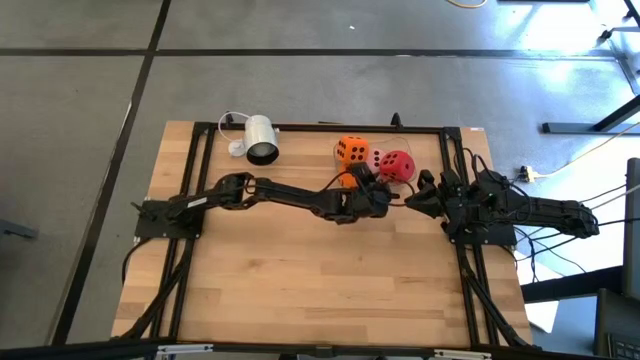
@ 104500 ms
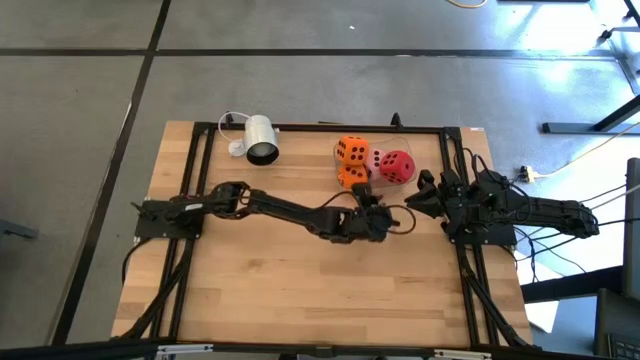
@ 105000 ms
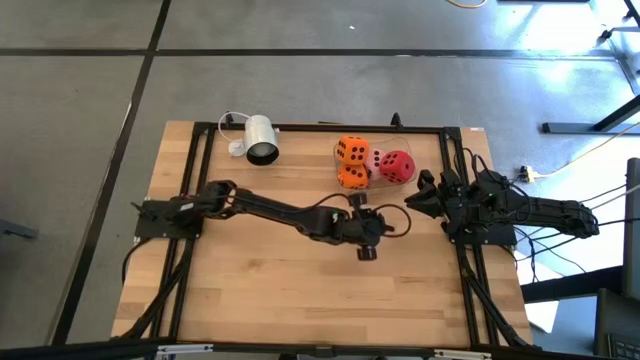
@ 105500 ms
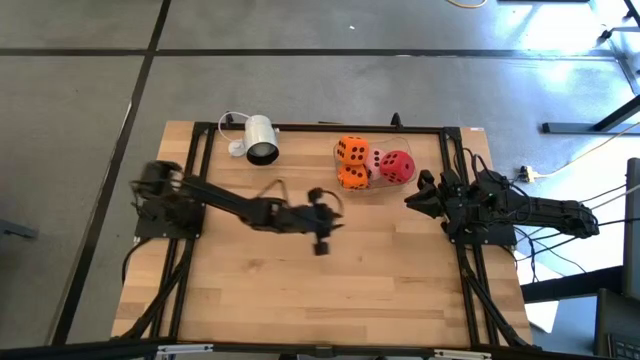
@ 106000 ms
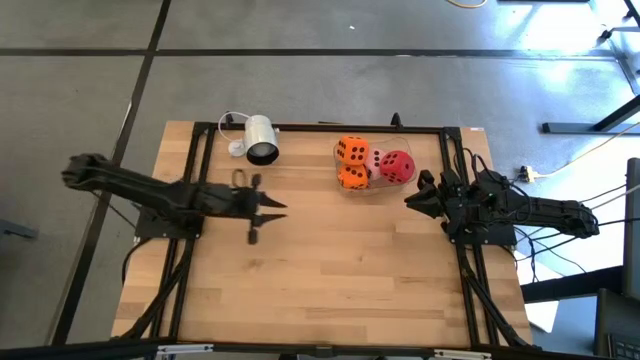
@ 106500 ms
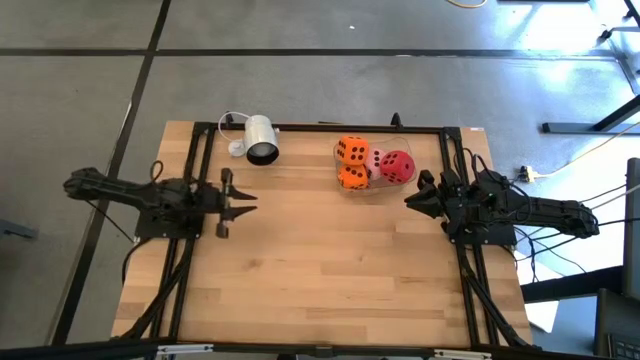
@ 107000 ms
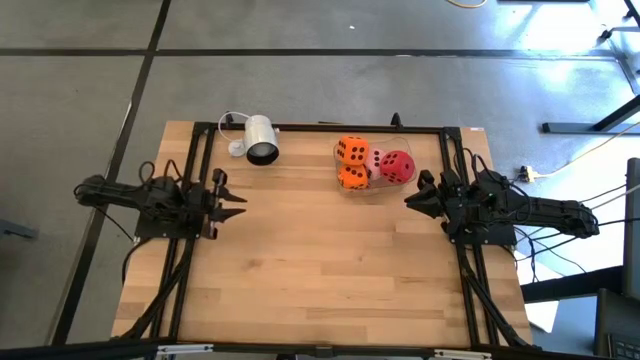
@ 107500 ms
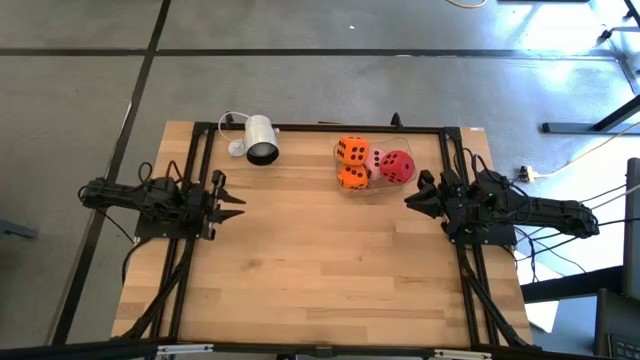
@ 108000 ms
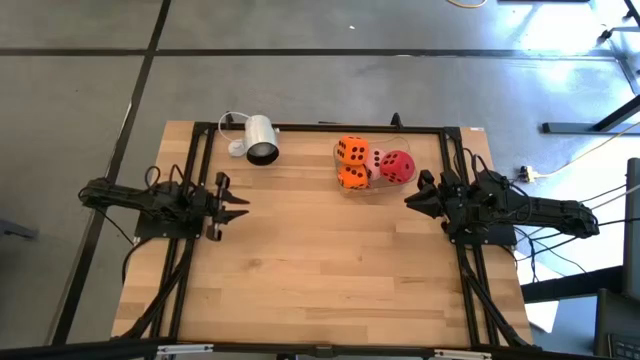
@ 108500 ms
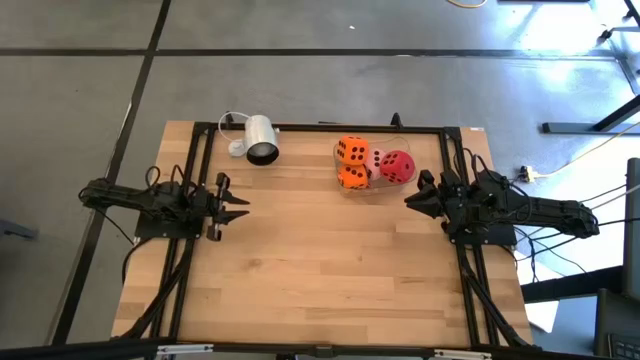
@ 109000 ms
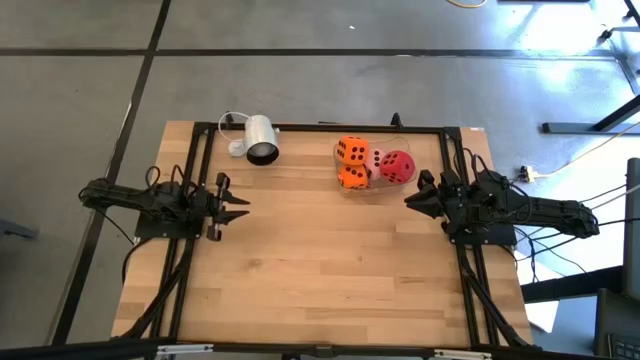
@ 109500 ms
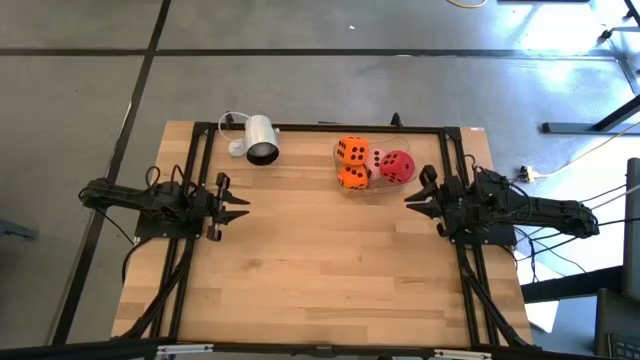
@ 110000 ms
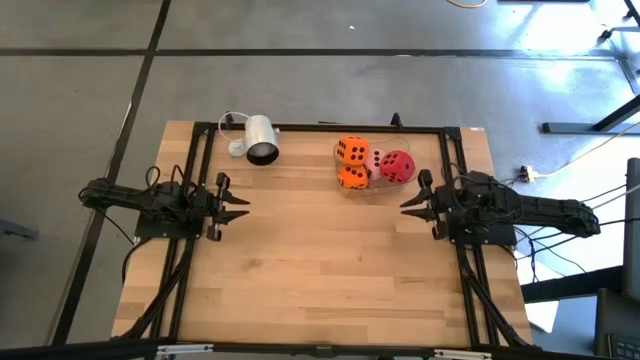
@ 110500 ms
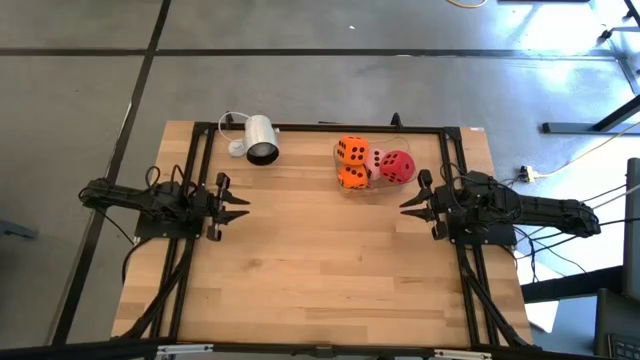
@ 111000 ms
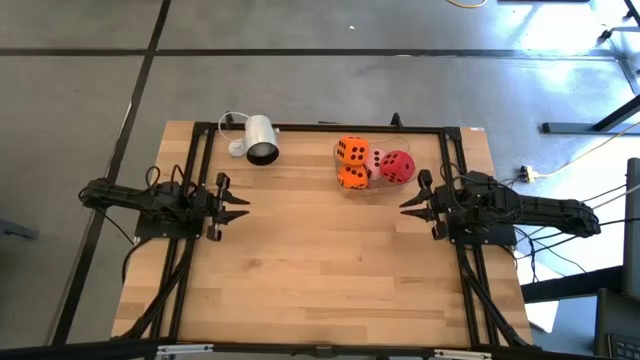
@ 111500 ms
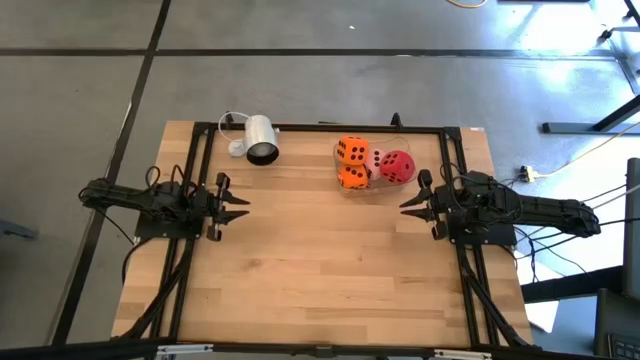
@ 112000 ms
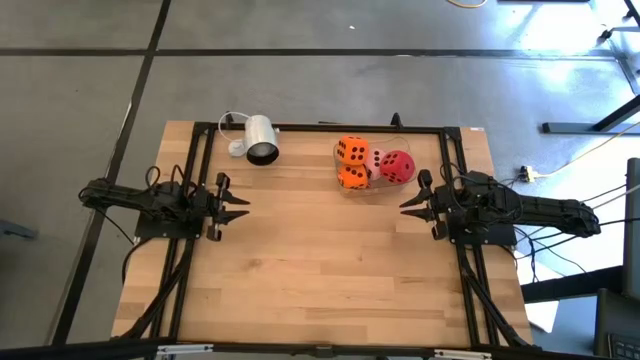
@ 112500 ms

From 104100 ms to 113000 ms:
Task: Pick & Place Dice
Return to Home Position

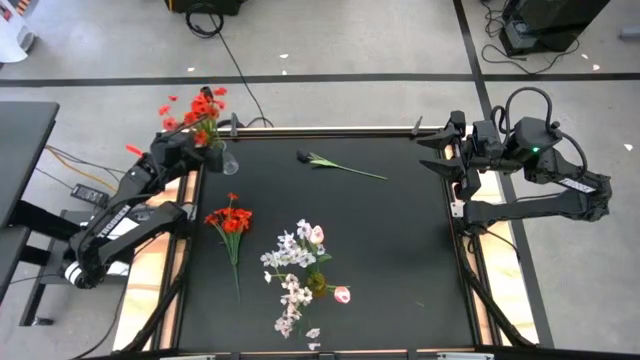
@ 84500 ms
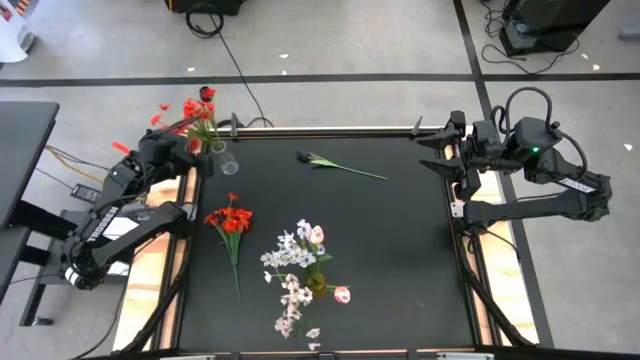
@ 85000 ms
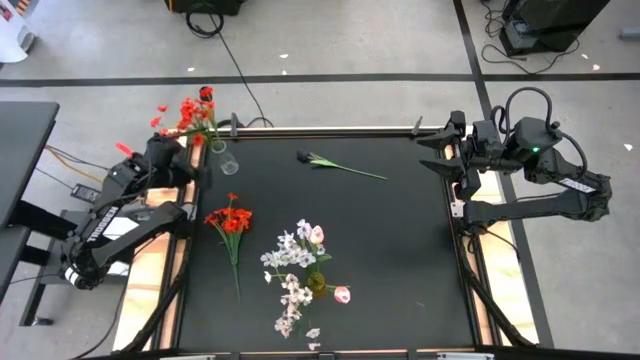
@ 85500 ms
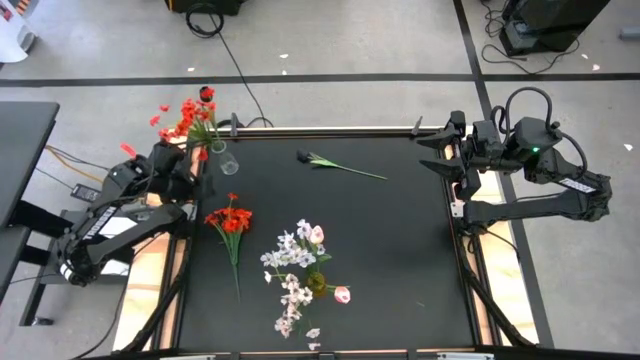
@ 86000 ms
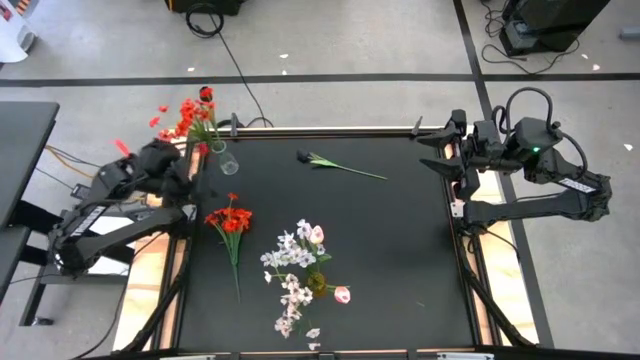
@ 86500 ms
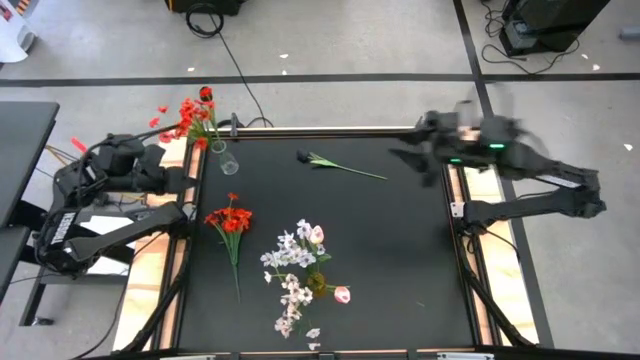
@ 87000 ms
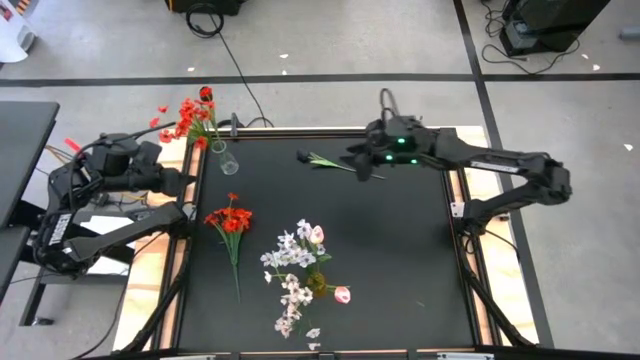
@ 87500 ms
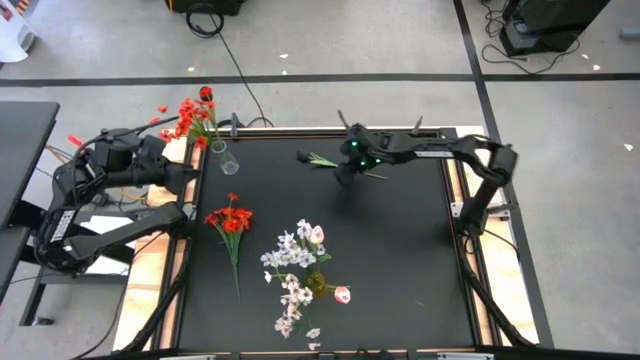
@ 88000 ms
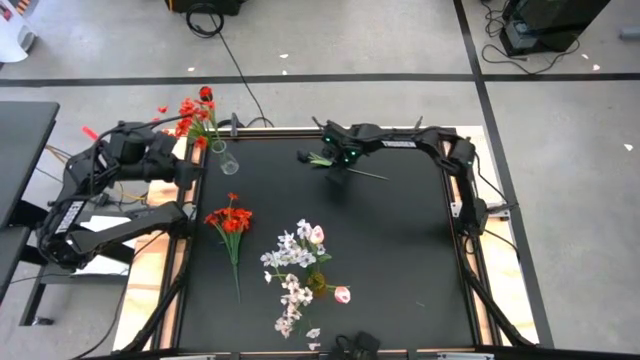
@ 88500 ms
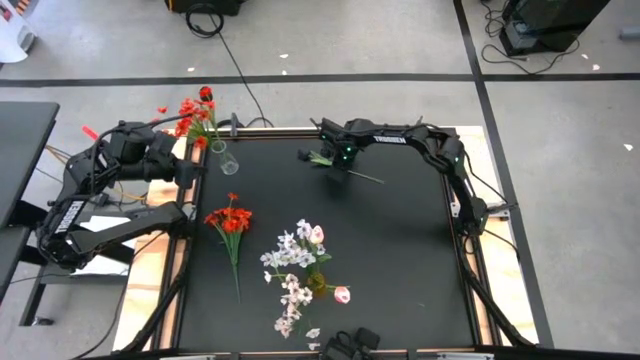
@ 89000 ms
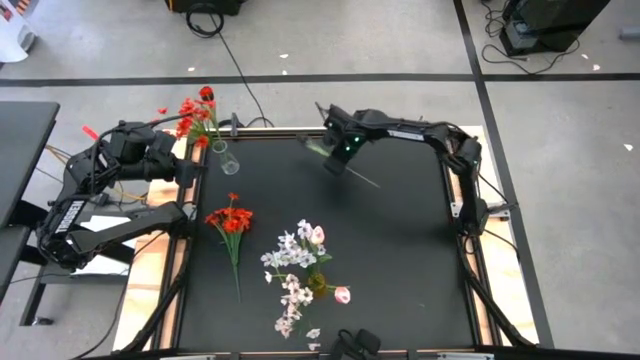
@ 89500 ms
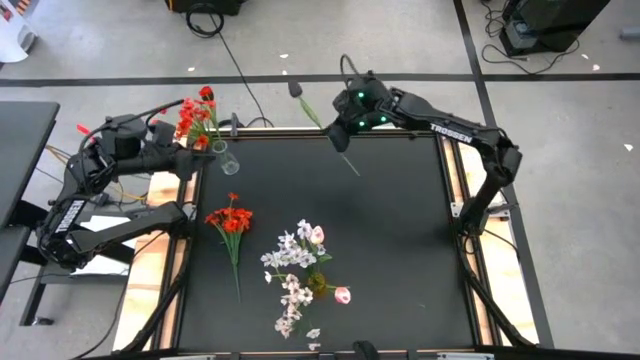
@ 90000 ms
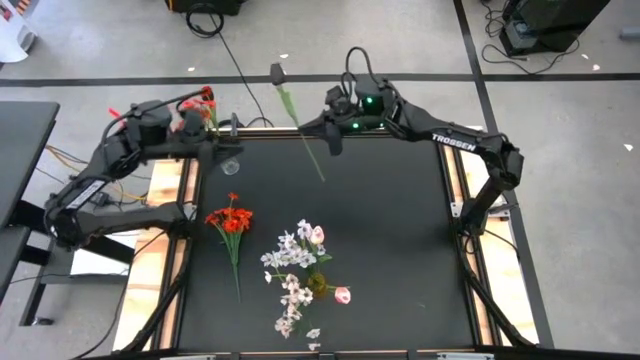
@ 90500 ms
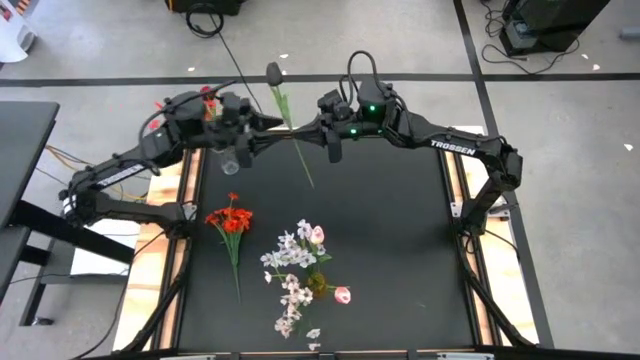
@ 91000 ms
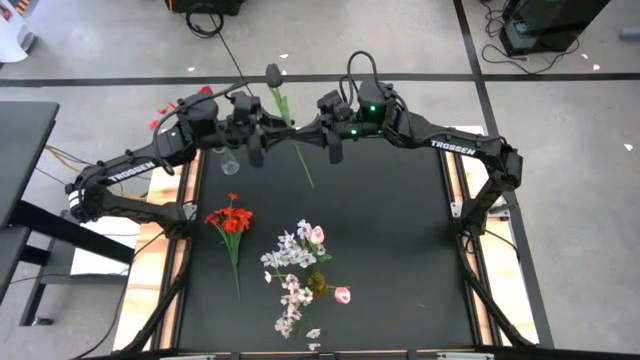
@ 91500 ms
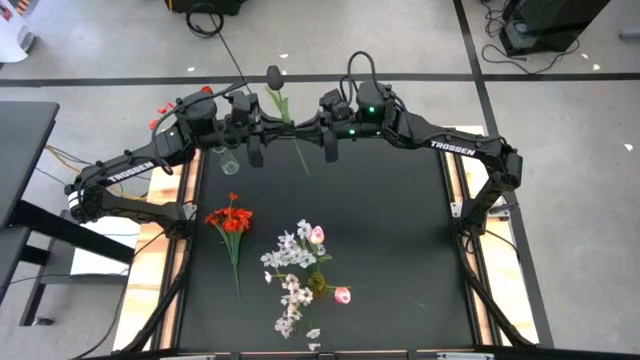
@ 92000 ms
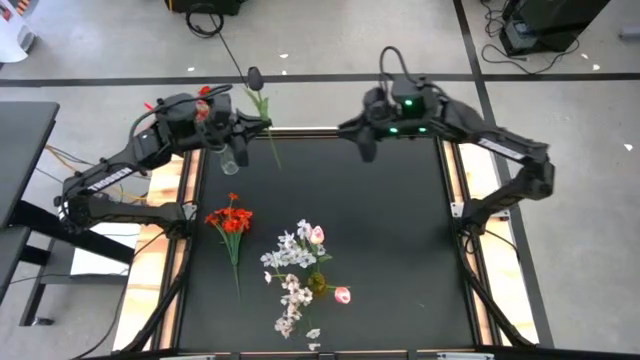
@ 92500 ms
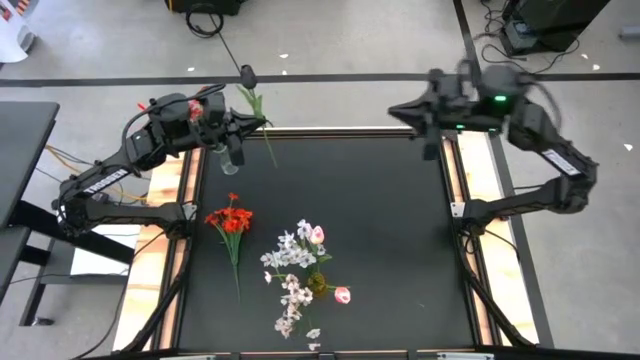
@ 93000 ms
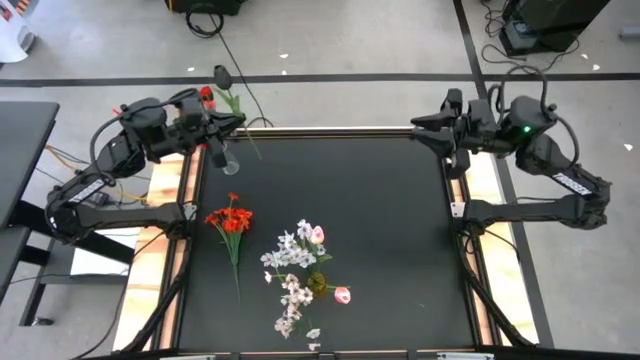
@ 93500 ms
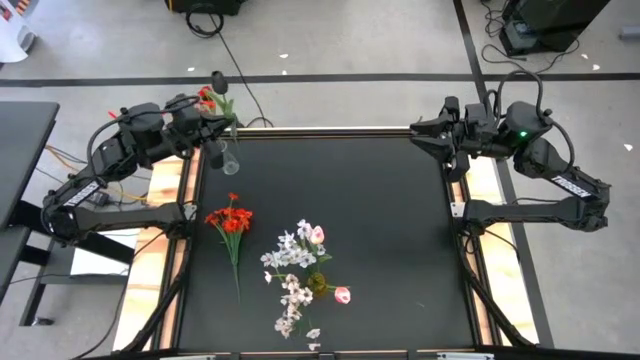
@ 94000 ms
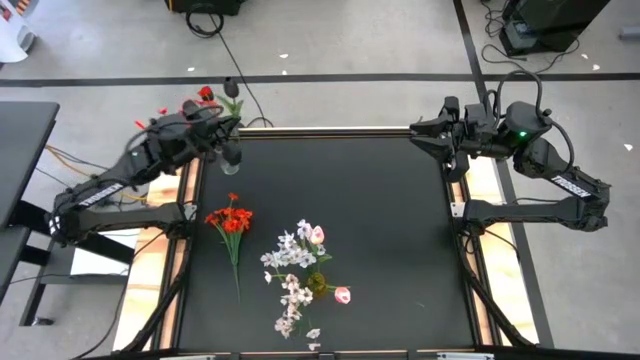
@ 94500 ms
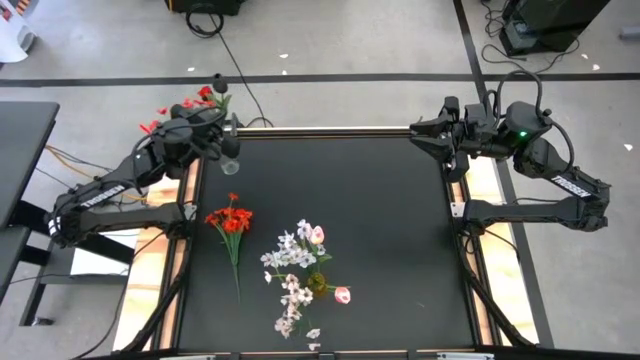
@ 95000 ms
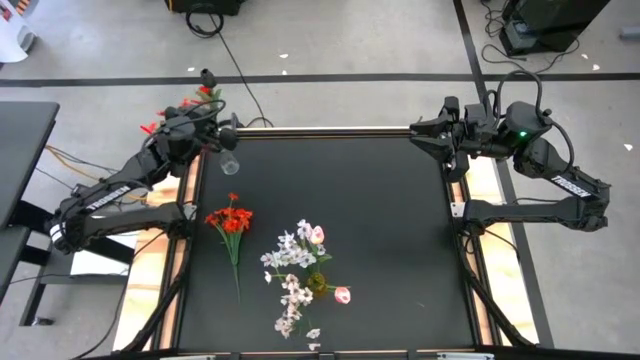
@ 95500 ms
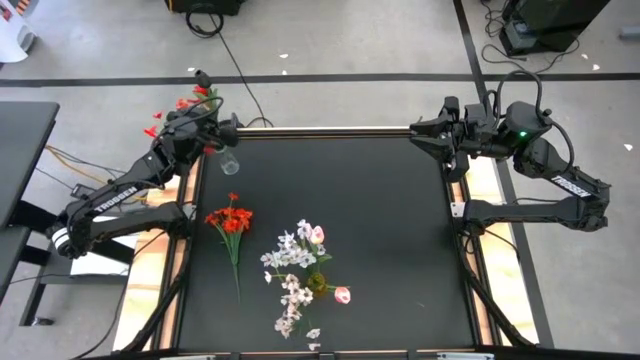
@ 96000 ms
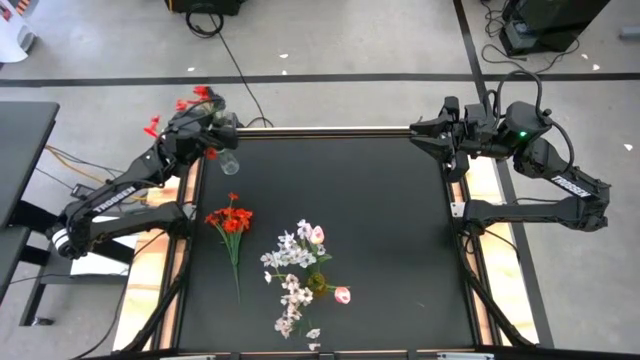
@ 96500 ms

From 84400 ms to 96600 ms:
Task: Sort flowers into vase by color
Put the black flower into the transparent vase
